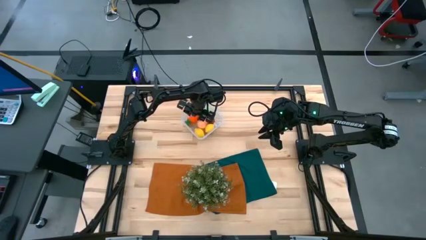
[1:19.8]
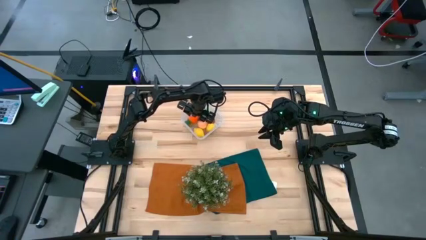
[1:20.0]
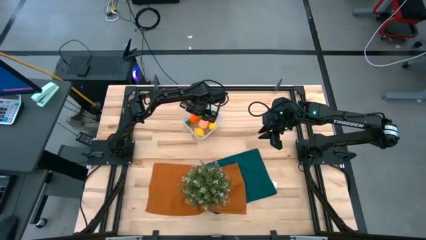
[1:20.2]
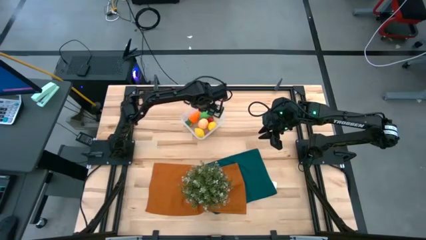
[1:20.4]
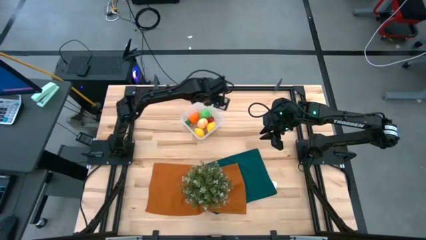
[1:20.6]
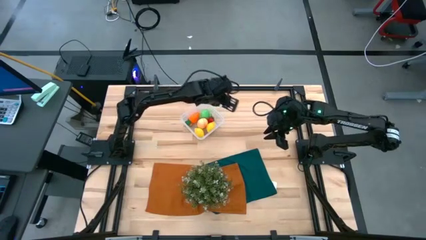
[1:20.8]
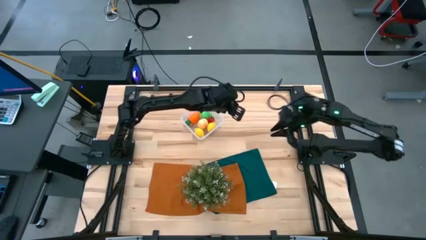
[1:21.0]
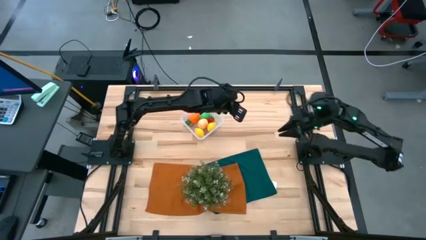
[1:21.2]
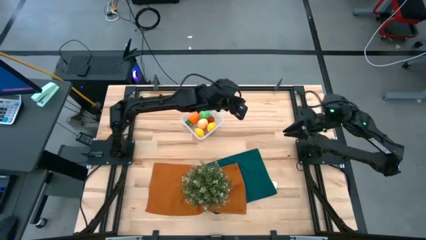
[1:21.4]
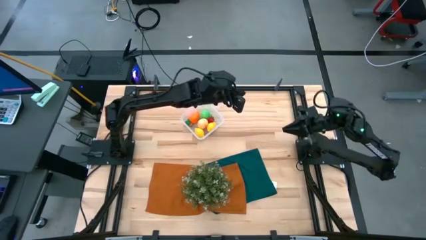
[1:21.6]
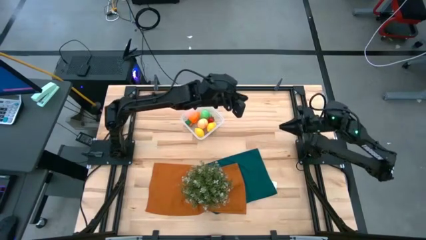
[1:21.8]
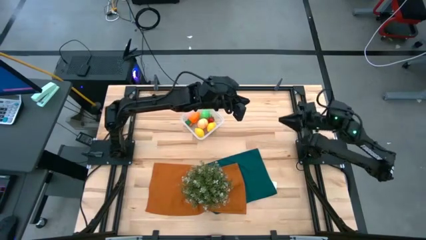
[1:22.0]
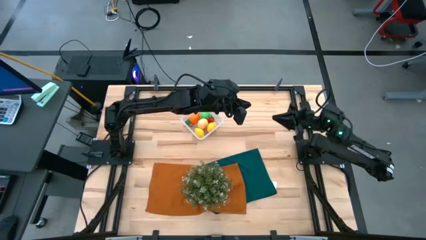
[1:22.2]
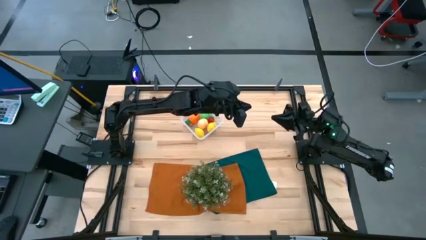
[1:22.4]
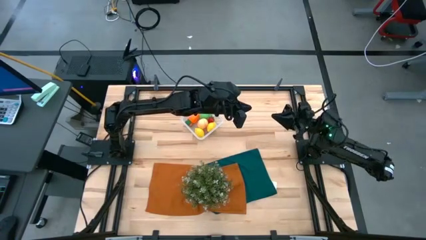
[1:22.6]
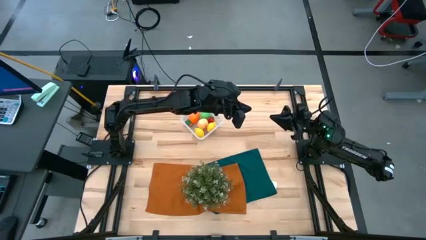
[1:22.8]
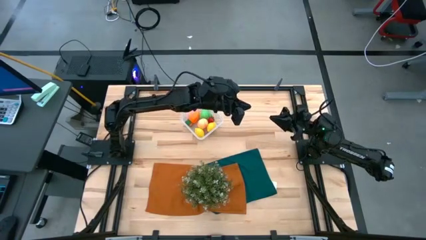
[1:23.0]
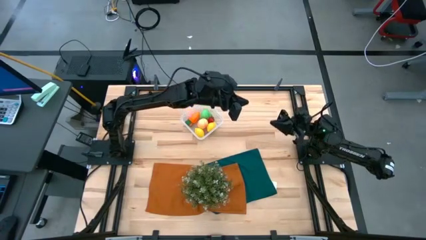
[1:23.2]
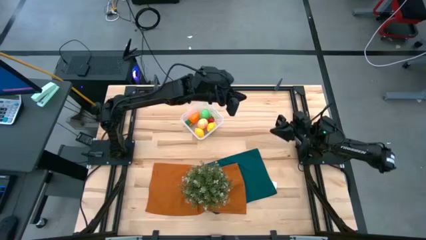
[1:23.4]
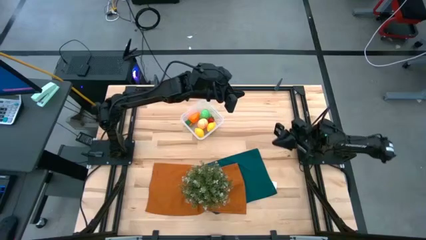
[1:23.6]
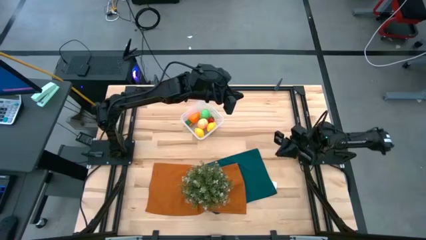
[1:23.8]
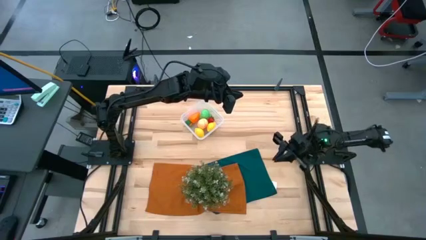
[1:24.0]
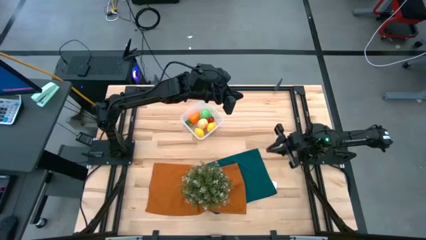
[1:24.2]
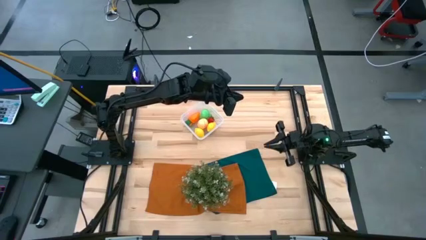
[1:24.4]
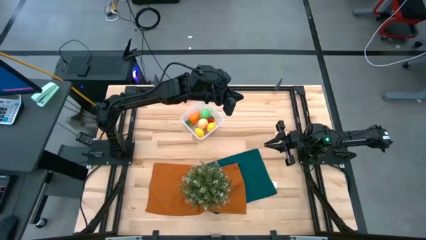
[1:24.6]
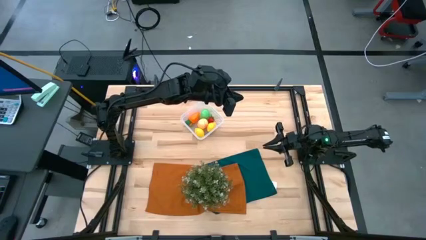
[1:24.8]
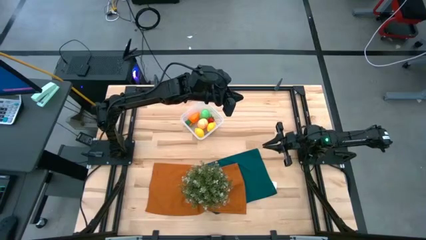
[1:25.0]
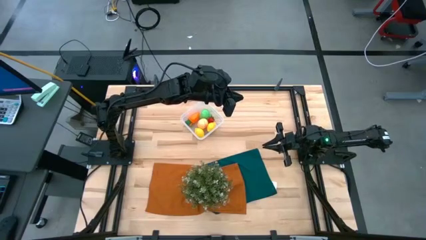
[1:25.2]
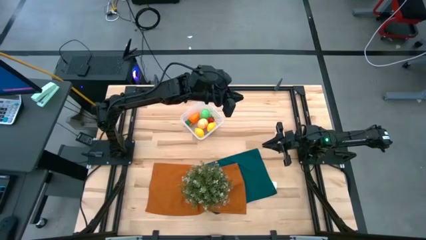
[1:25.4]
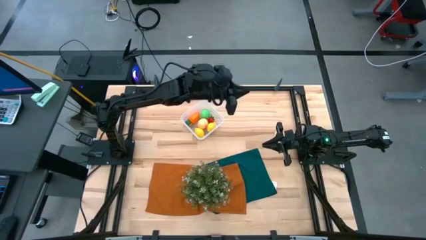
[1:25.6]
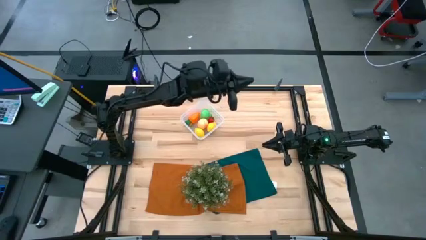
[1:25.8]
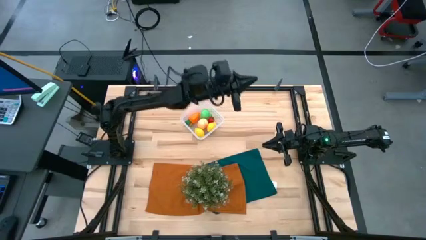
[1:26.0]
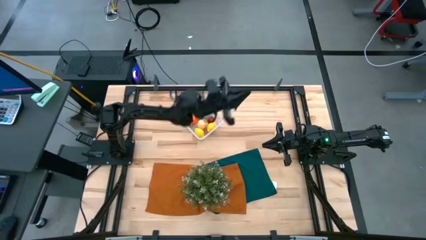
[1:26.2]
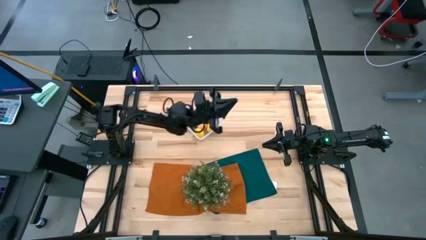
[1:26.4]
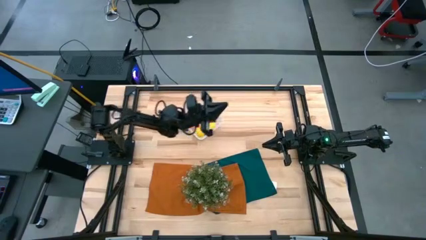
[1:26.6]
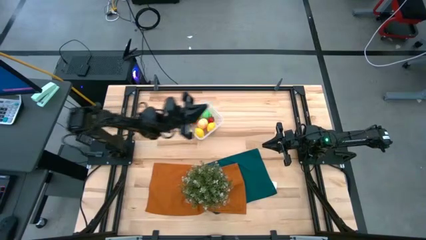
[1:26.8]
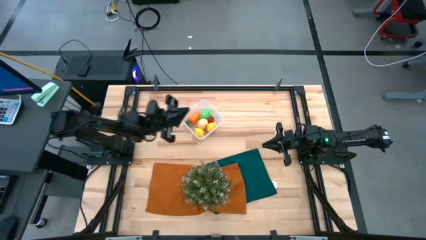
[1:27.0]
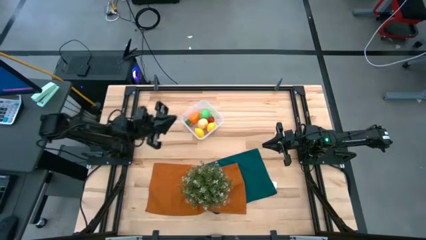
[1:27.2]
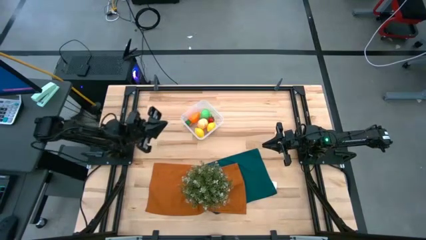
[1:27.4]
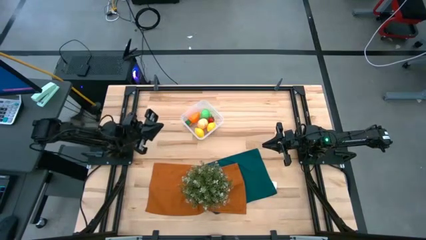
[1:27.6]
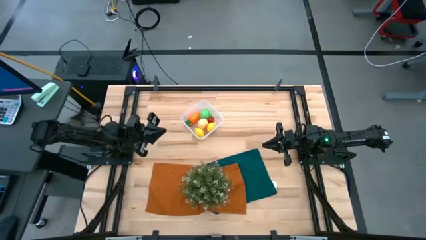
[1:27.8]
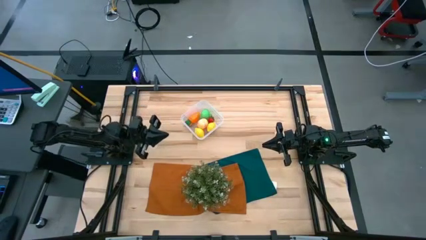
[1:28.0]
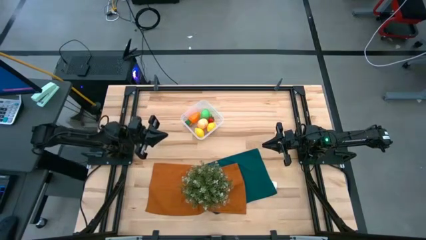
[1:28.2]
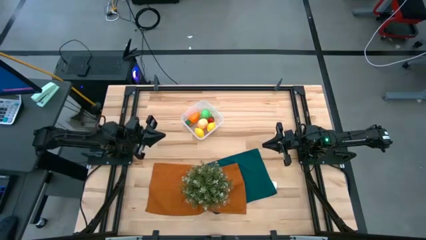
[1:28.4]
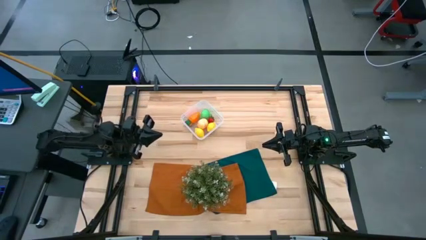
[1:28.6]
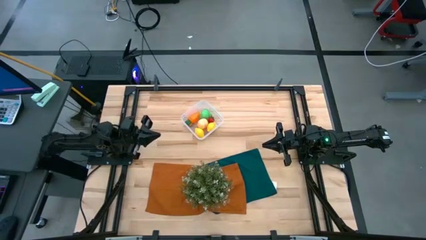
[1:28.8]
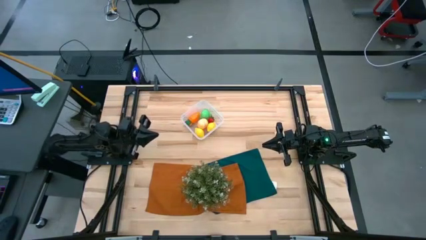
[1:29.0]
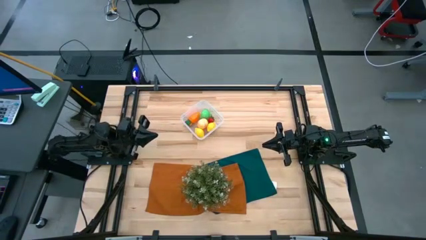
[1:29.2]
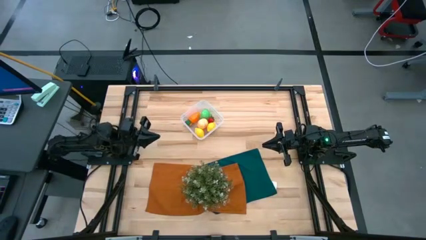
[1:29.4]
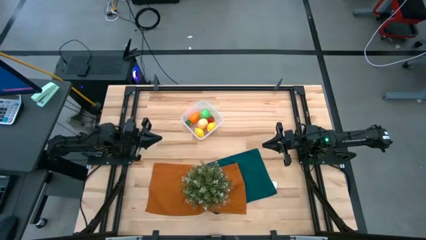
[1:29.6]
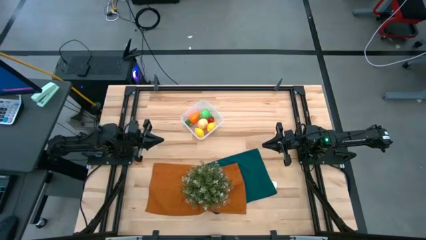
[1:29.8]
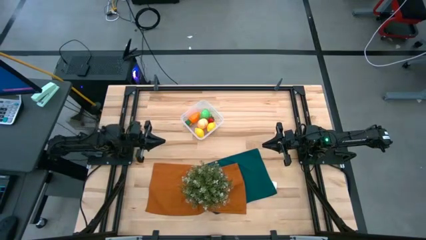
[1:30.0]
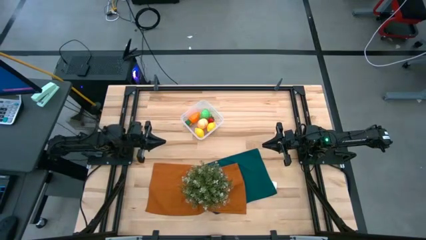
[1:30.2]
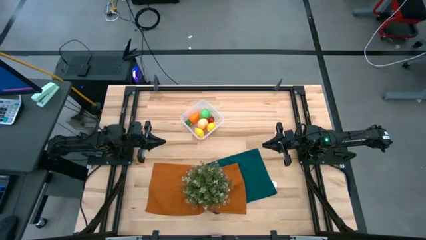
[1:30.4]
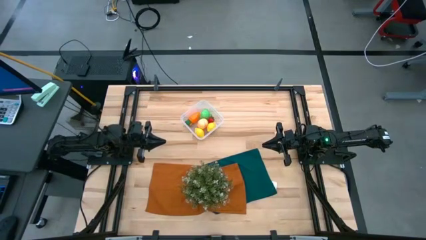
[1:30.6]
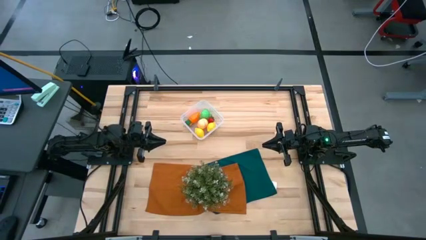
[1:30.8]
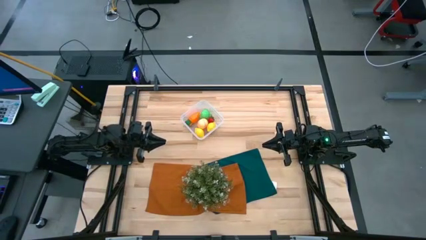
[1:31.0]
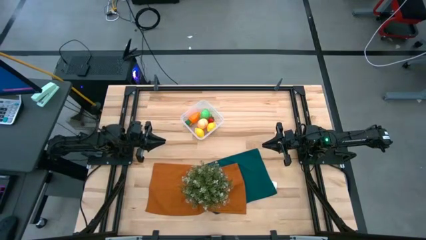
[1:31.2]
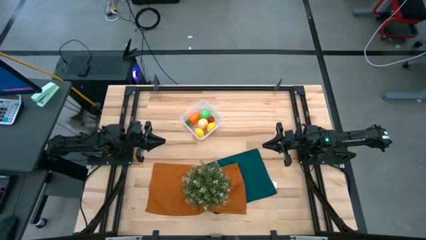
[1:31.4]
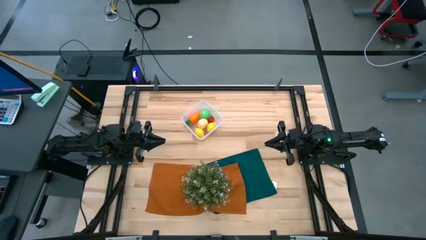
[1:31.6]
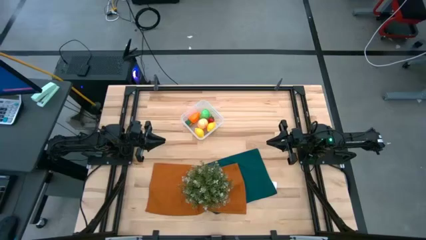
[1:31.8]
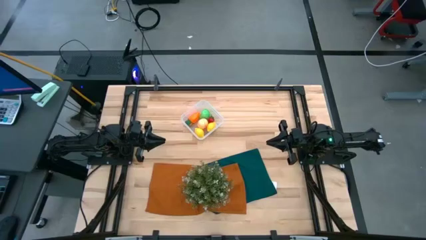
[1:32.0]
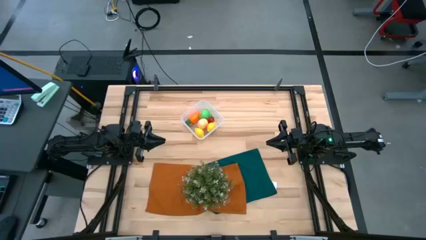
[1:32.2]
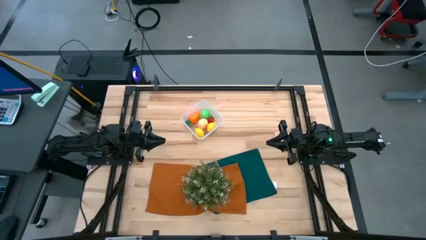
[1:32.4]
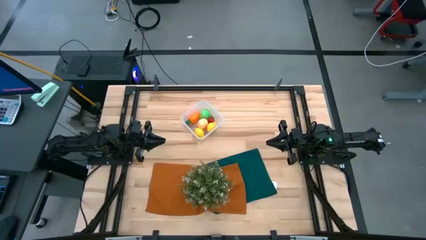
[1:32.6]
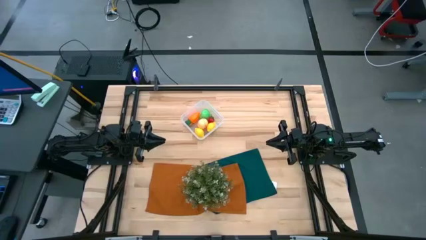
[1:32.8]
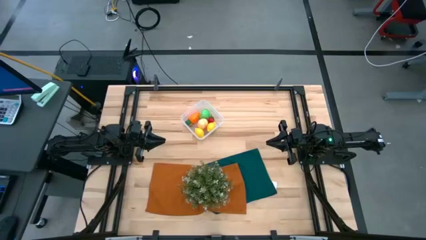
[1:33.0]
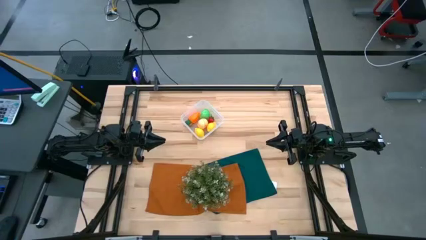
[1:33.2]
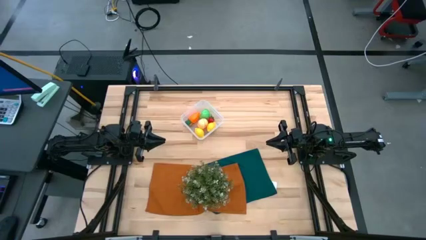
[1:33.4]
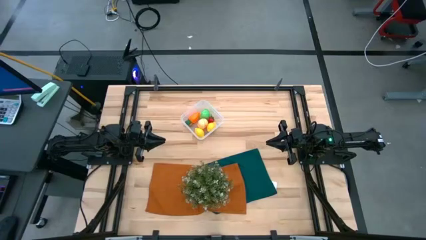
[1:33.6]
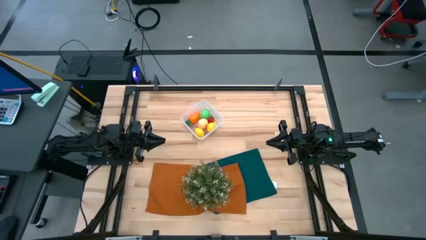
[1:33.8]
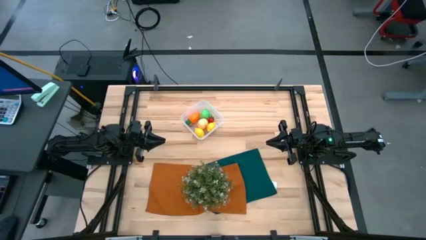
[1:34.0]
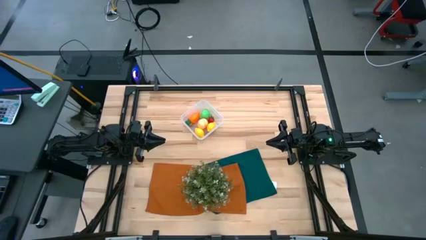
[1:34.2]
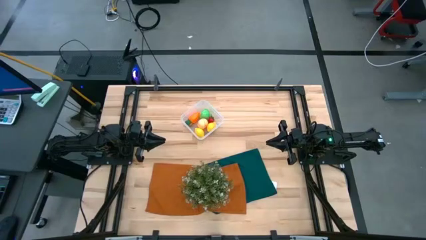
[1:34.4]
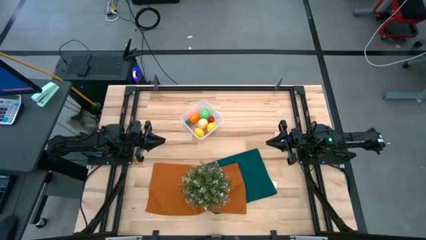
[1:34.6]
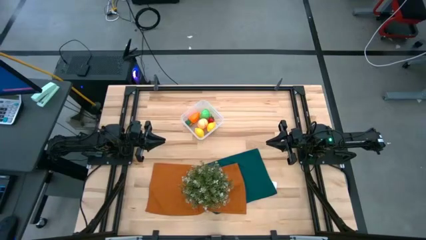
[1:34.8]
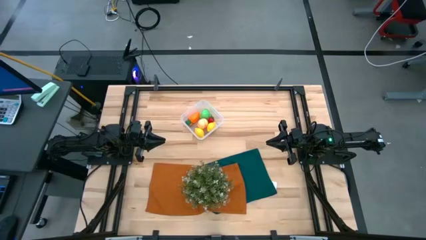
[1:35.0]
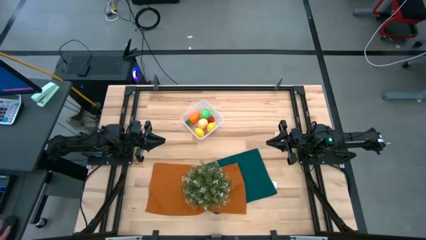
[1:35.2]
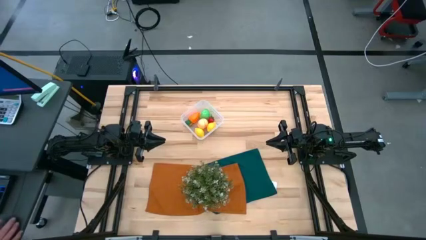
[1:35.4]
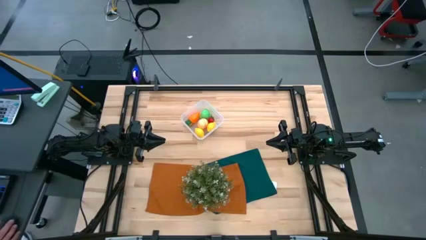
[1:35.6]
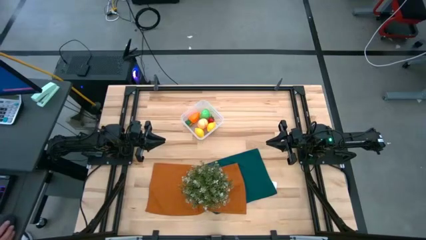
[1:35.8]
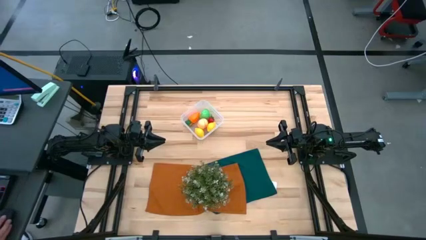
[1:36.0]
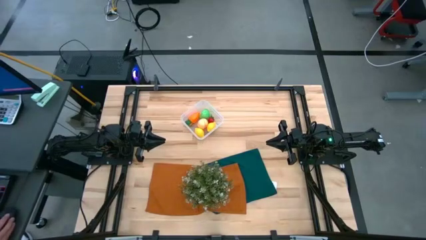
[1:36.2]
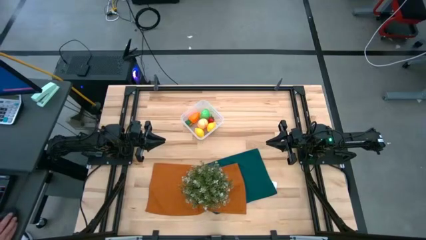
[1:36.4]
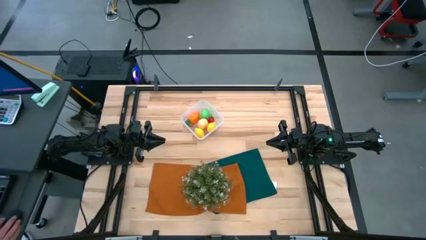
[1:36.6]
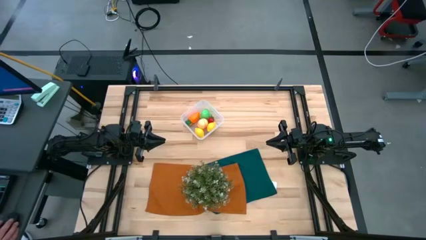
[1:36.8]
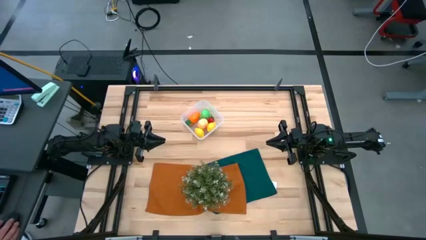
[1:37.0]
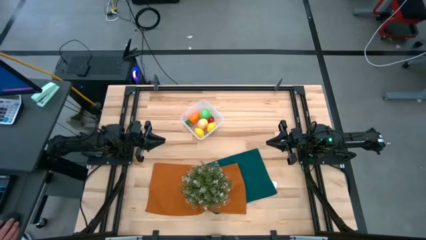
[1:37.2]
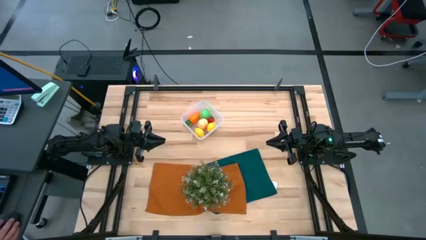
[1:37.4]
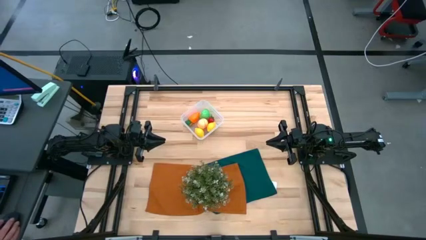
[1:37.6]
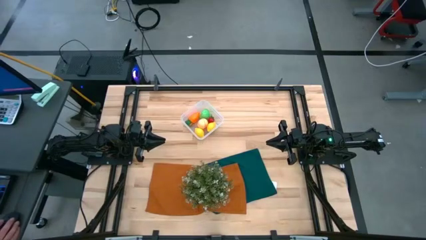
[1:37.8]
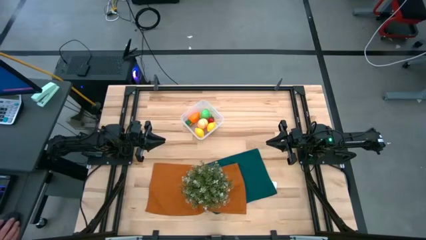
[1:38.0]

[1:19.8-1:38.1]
Task: Pick and placing Produce into tupperware
Return to Home Position
